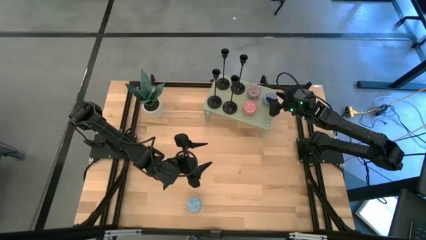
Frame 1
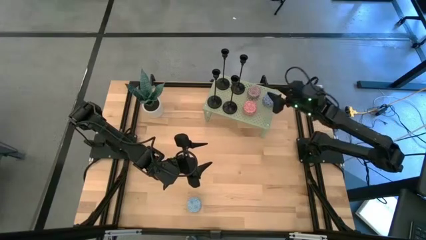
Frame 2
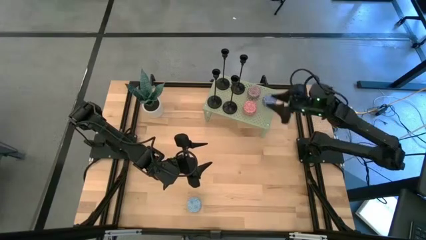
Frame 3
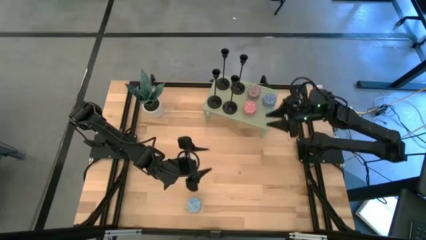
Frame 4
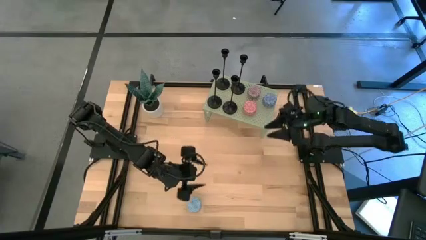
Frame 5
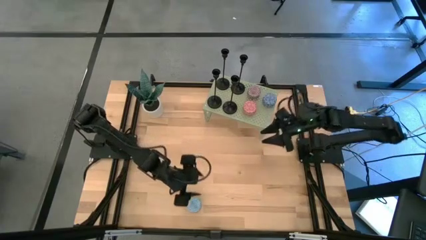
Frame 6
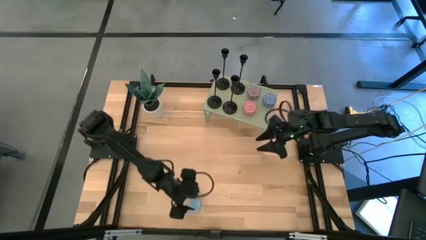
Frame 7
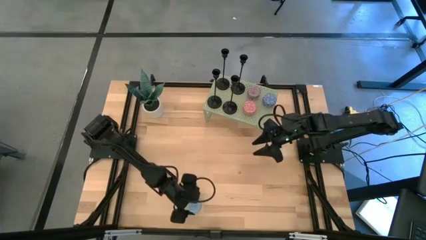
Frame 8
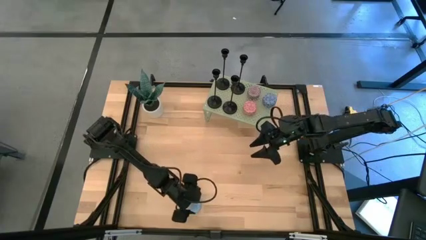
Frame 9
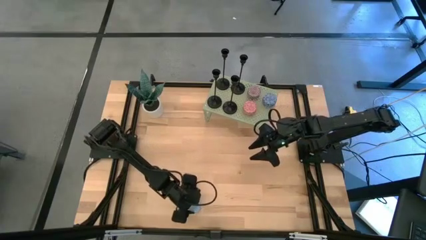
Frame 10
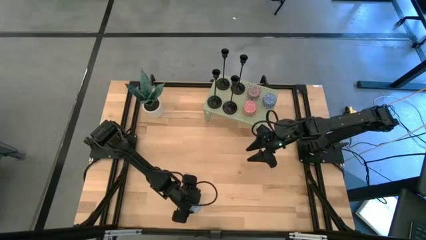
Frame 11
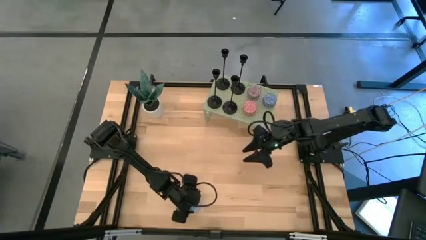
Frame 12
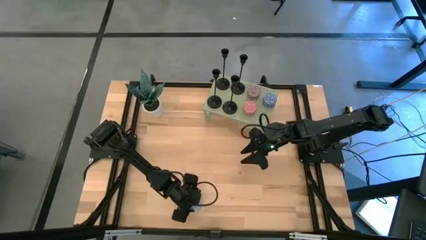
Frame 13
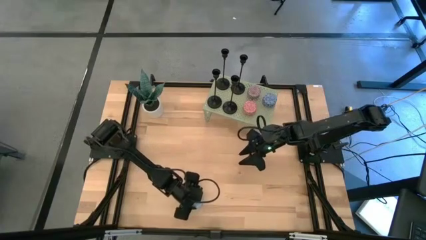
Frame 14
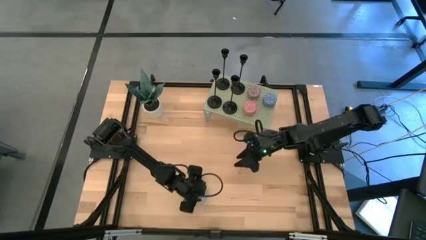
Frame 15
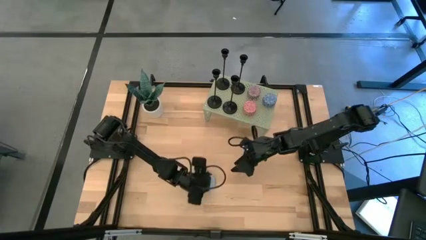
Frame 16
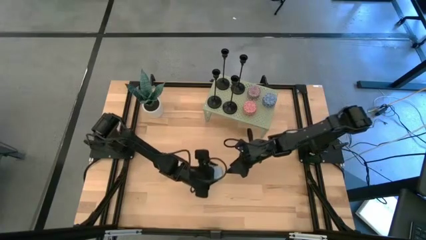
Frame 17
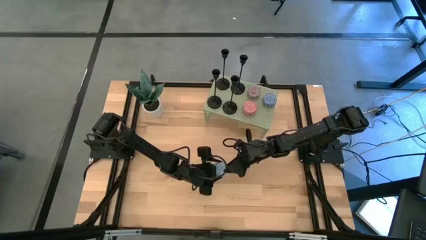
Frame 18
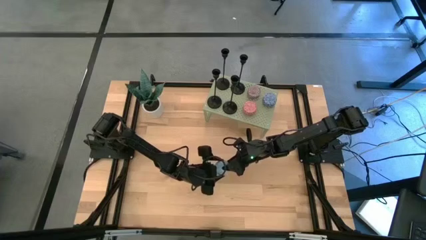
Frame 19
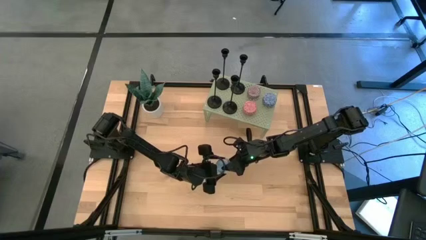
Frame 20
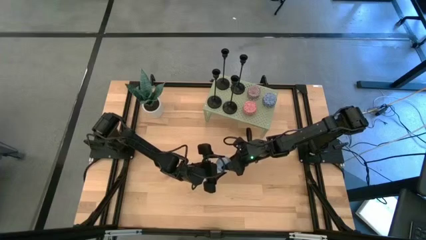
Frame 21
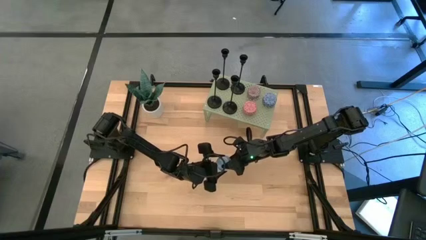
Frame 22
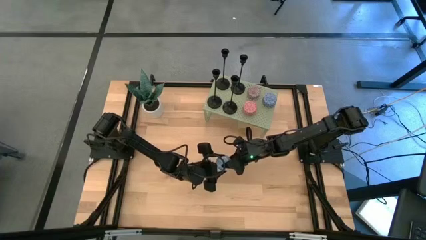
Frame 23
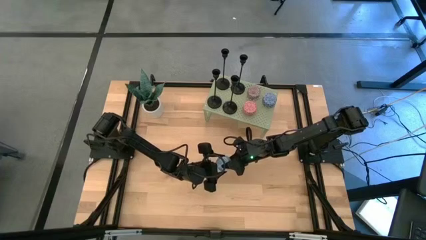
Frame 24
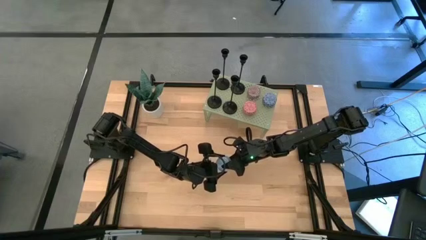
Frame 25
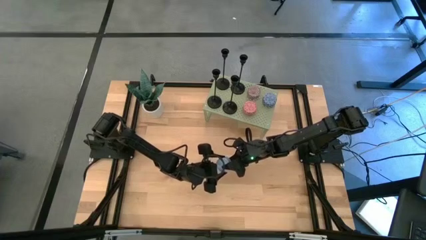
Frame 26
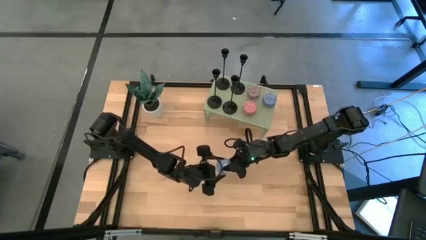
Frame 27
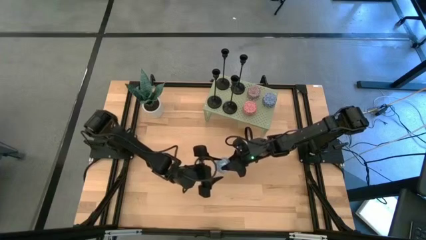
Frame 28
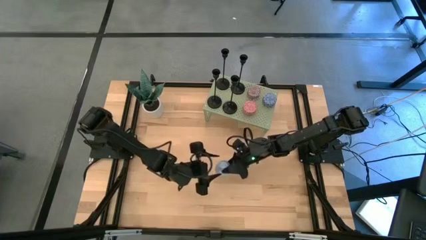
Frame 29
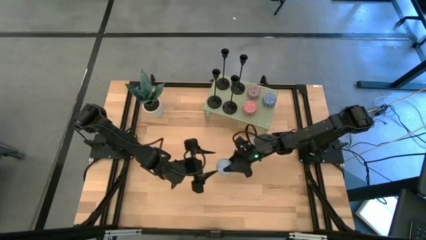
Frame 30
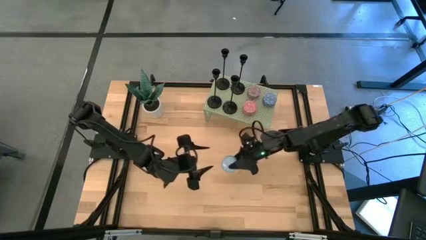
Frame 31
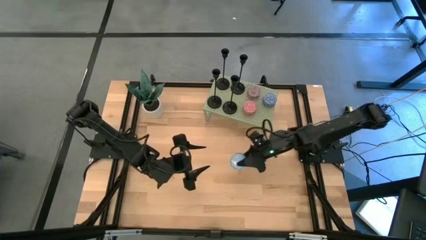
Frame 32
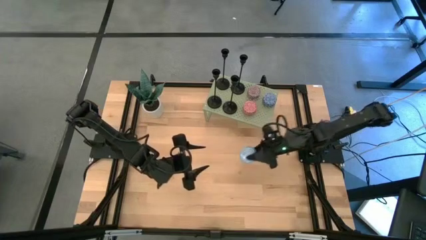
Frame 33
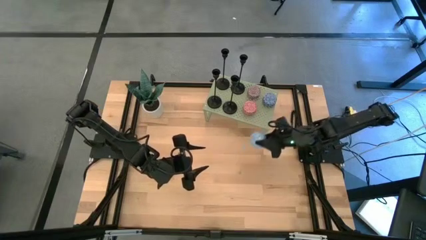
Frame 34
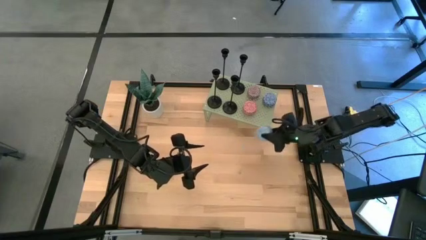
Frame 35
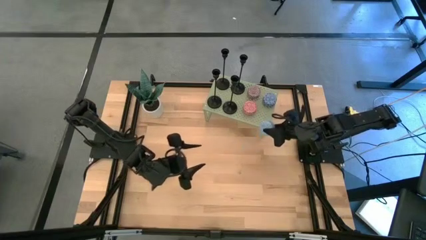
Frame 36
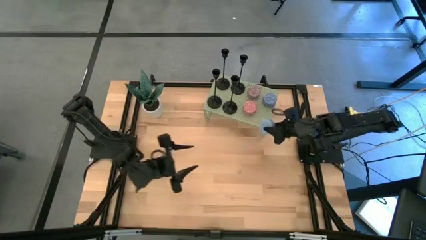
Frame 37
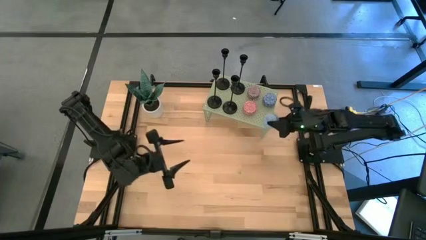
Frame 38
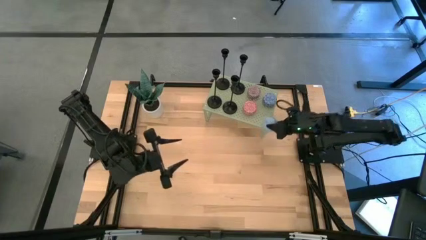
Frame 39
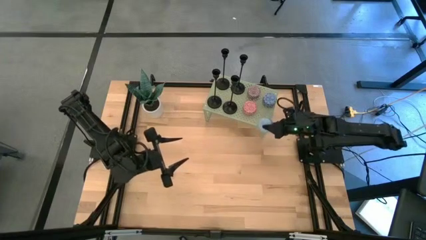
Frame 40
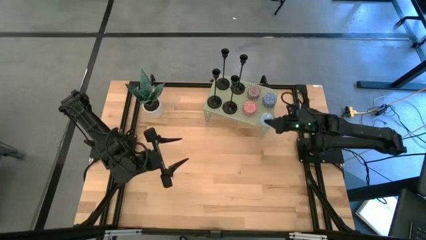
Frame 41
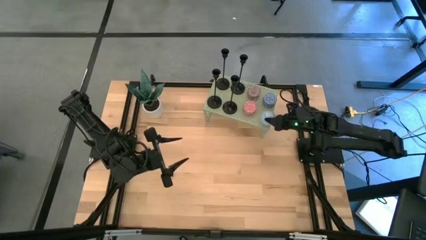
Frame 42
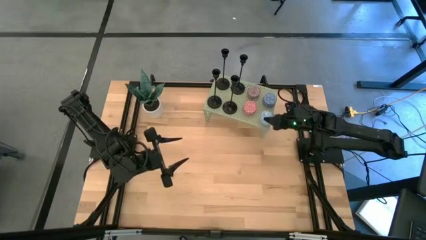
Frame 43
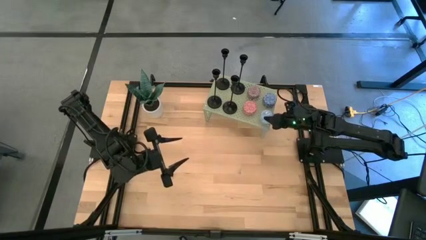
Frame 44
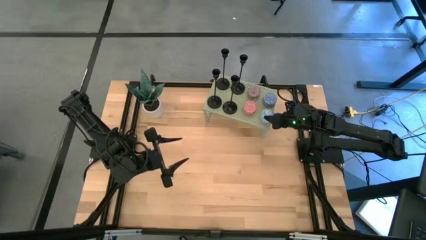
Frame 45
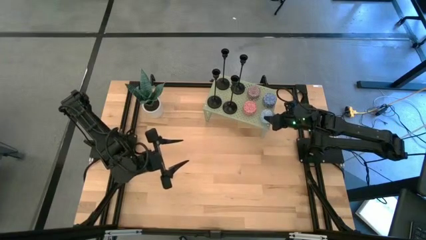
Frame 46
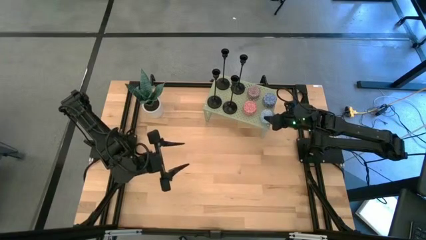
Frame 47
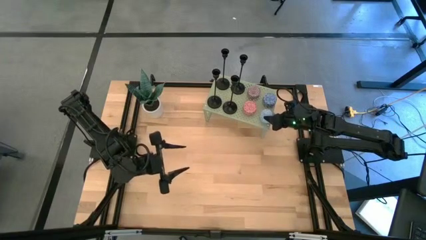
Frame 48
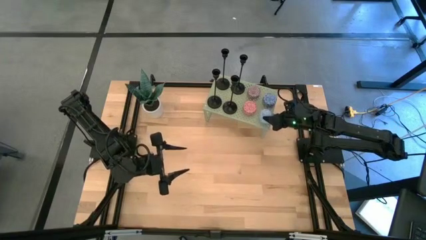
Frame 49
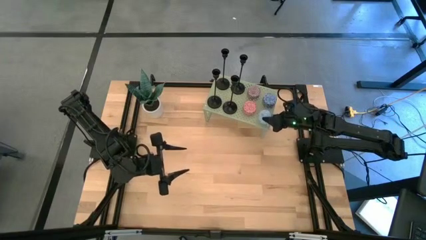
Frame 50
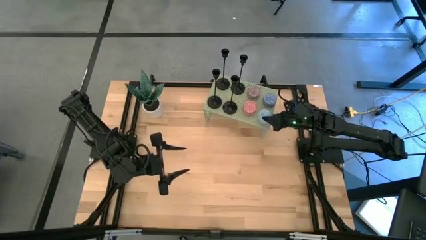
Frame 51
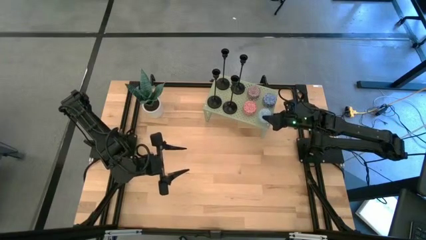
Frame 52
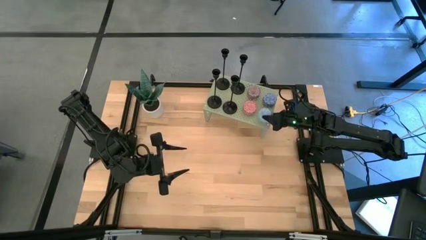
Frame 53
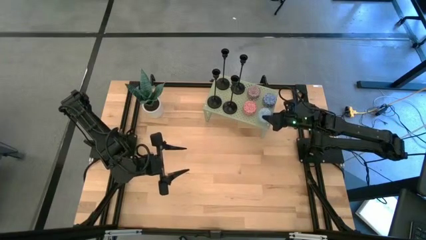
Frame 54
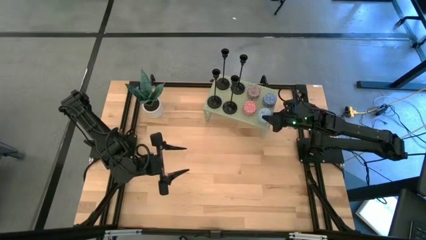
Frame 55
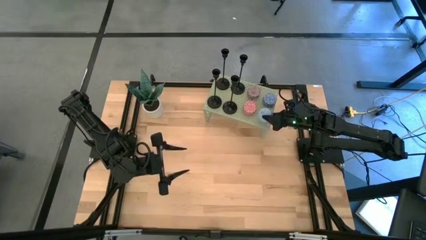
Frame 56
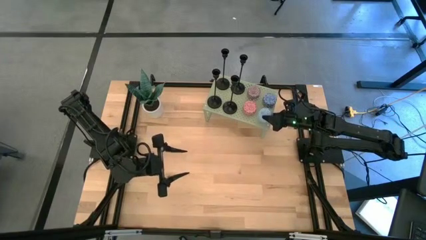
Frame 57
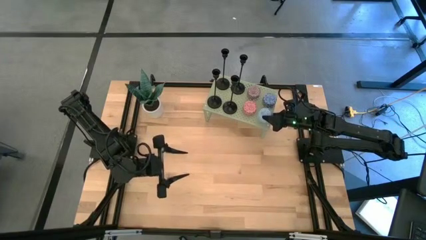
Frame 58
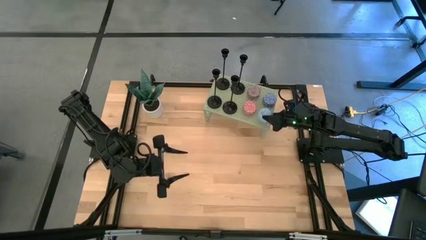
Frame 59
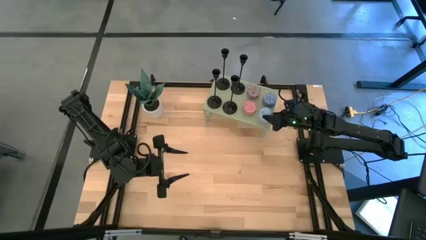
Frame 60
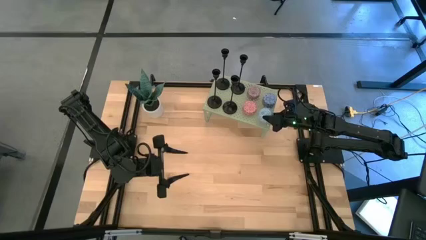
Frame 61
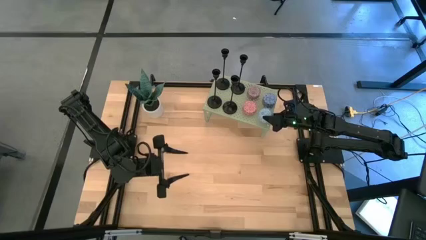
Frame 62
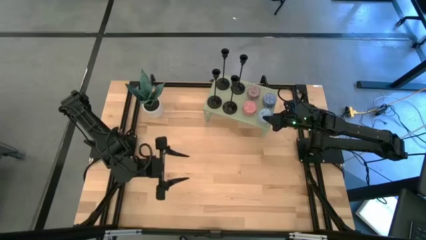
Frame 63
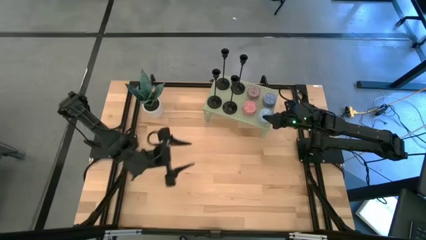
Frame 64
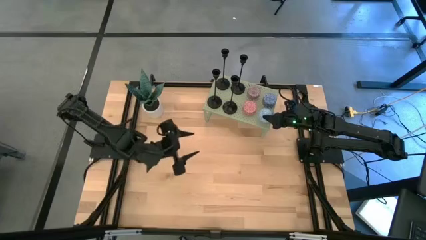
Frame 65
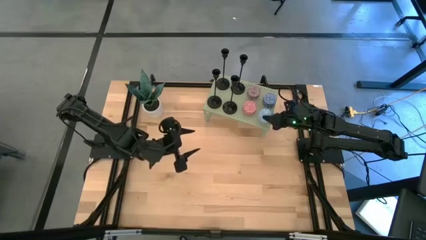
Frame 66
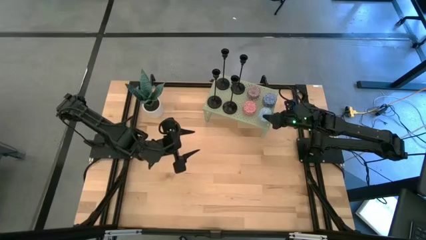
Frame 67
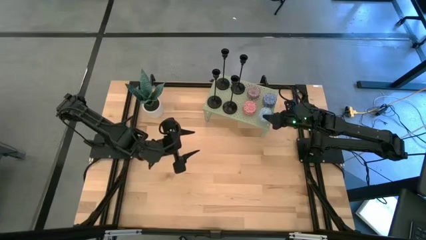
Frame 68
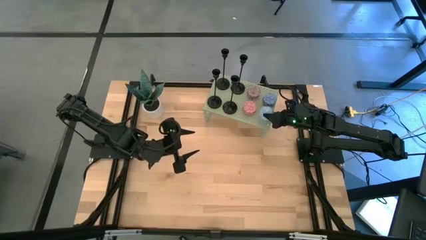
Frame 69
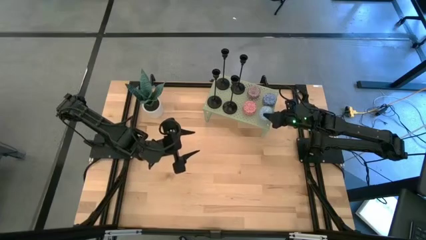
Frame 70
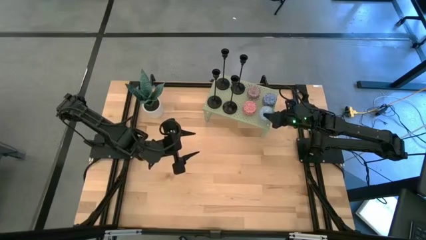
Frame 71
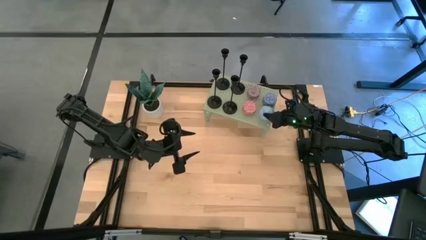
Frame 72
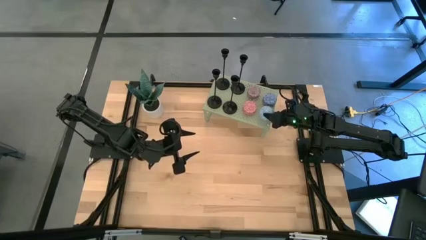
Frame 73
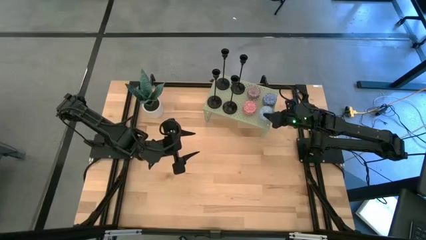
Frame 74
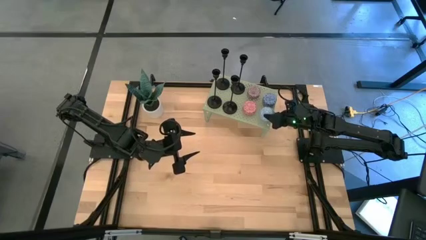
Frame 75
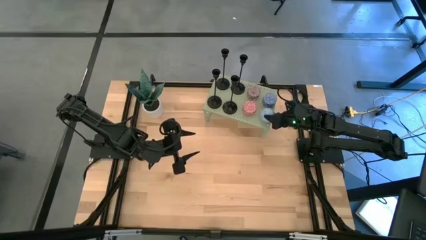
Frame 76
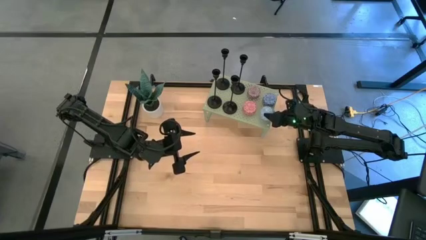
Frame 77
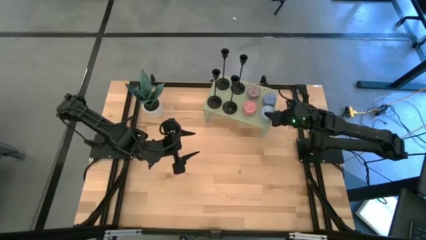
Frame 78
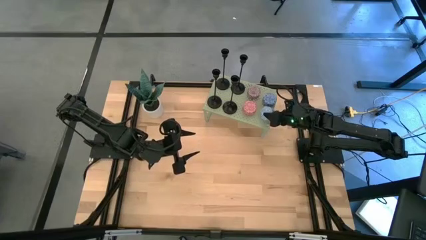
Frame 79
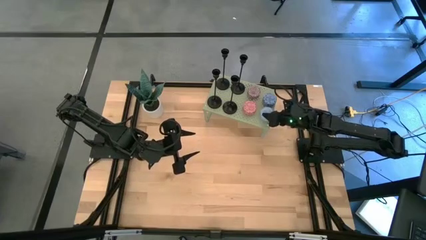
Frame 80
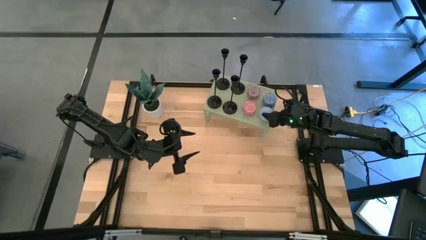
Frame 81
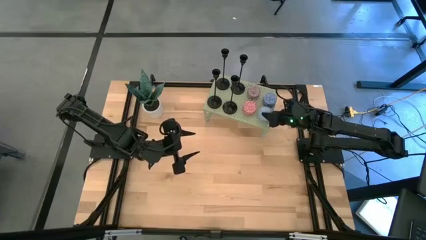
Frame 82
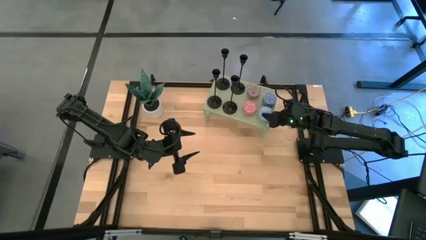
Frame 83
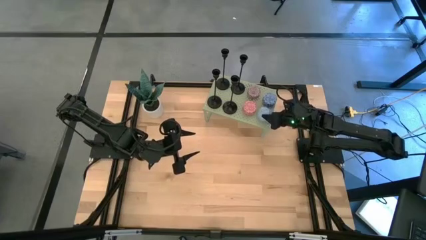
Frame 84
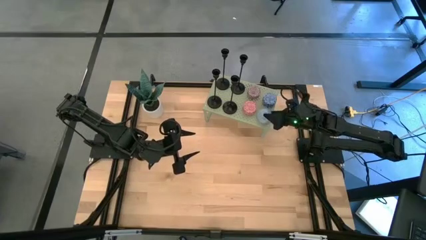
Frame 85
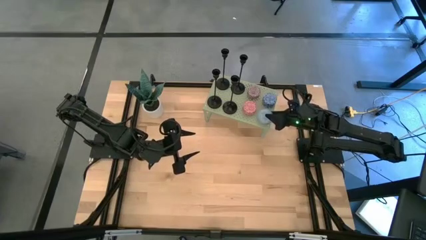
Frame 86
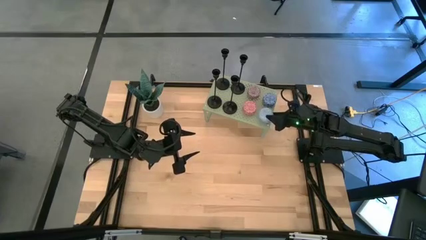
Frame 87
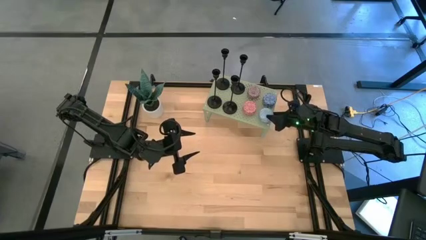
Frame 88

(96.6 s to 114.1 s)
Task: Pick & Place candle stick holders
Put the light blue scented candle on the shelf
